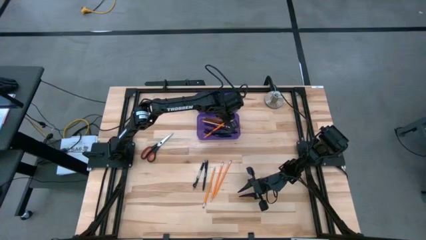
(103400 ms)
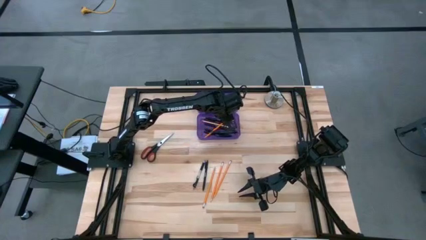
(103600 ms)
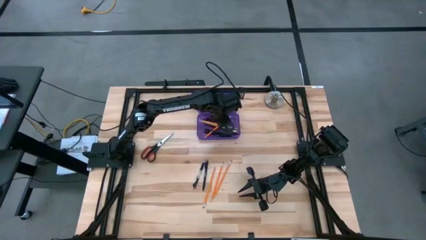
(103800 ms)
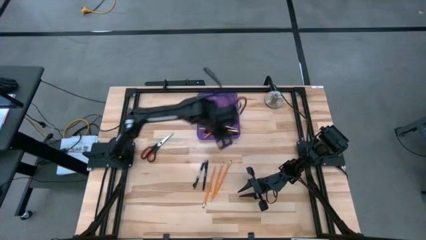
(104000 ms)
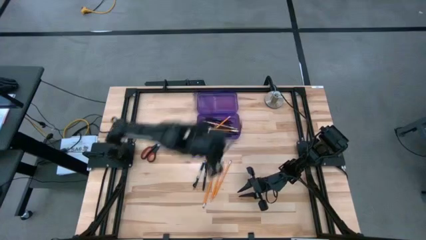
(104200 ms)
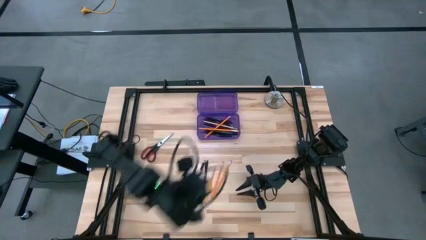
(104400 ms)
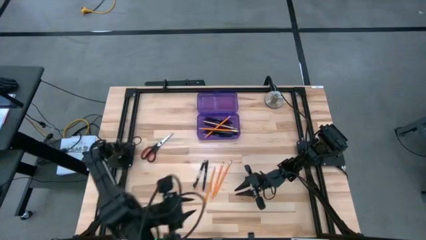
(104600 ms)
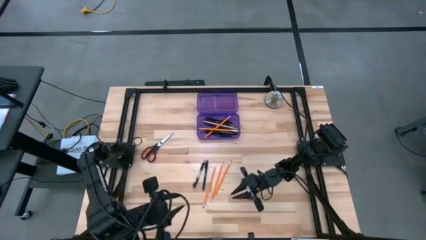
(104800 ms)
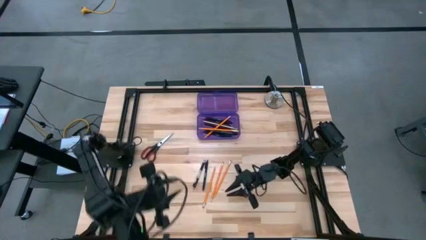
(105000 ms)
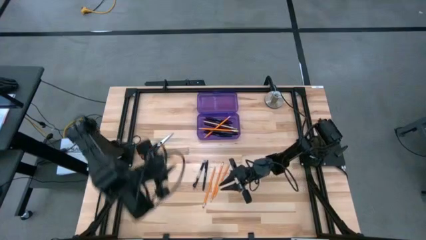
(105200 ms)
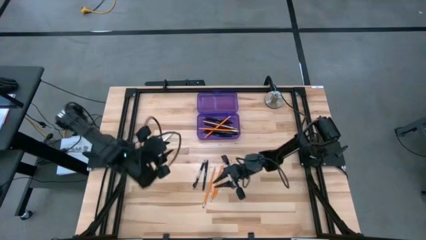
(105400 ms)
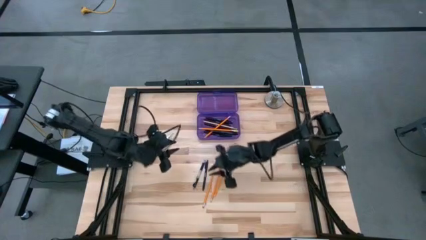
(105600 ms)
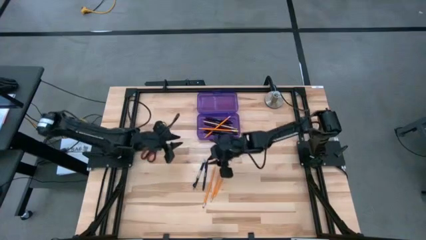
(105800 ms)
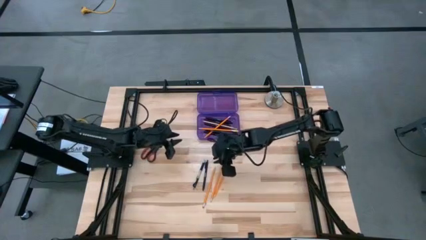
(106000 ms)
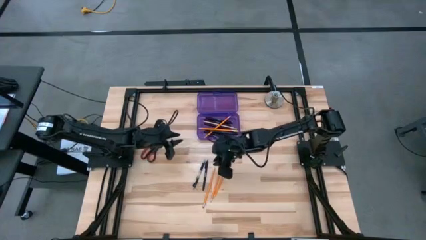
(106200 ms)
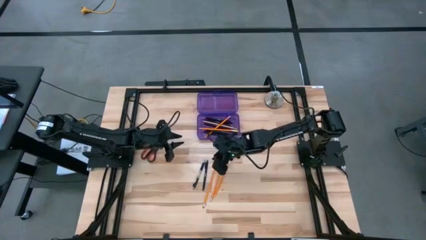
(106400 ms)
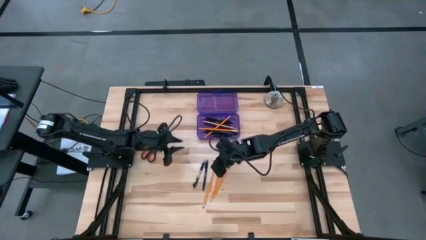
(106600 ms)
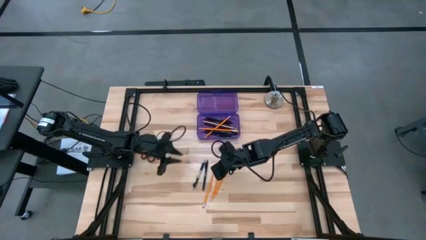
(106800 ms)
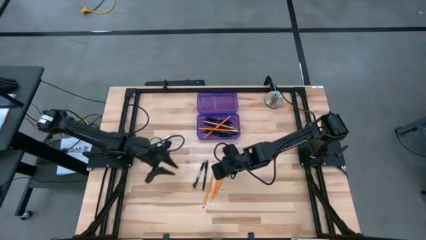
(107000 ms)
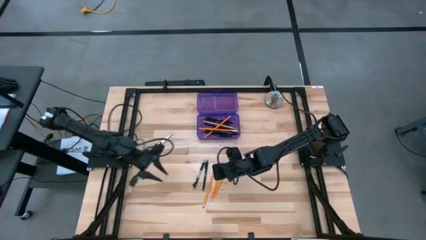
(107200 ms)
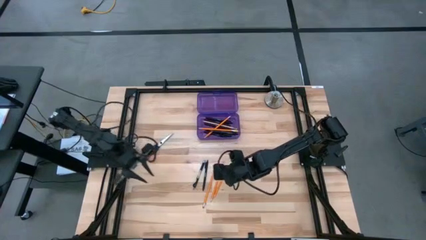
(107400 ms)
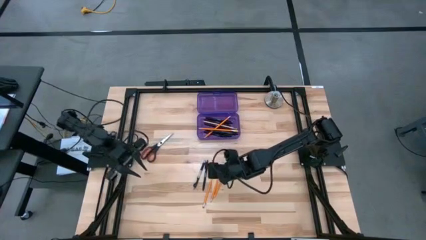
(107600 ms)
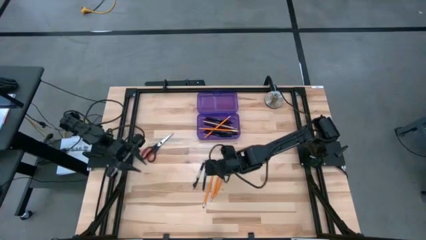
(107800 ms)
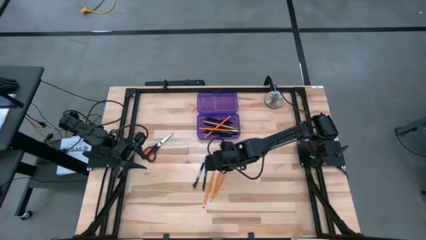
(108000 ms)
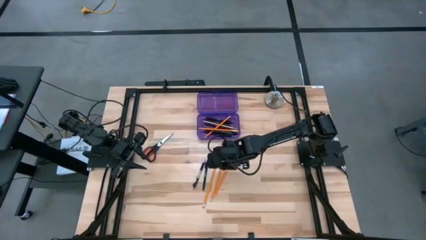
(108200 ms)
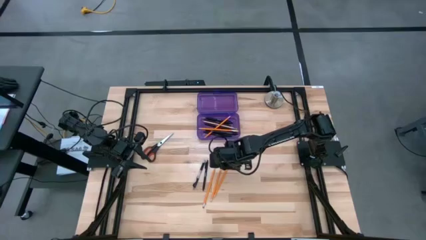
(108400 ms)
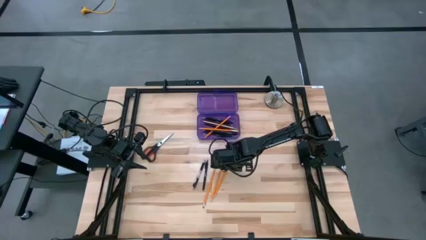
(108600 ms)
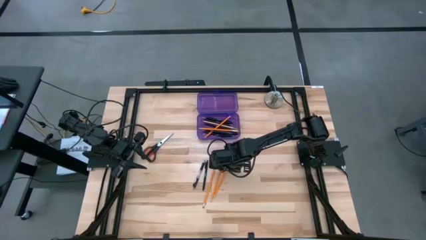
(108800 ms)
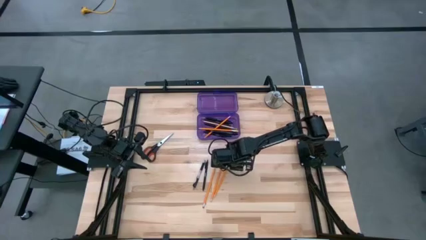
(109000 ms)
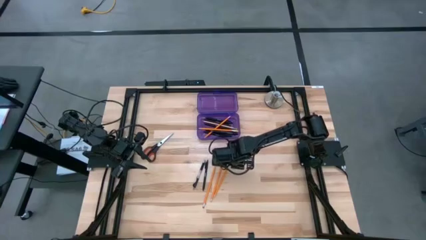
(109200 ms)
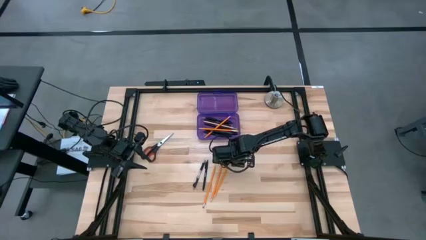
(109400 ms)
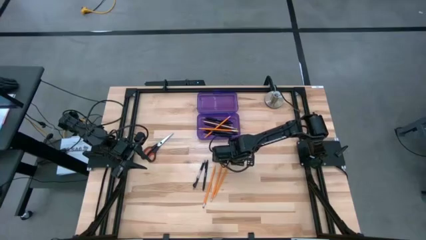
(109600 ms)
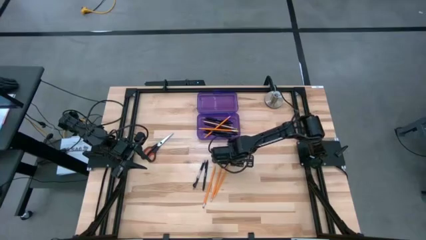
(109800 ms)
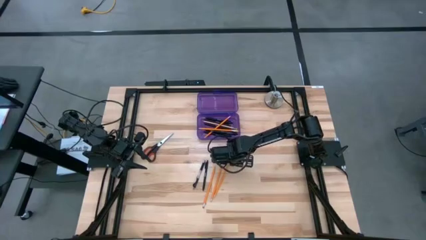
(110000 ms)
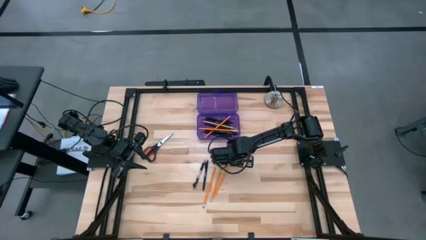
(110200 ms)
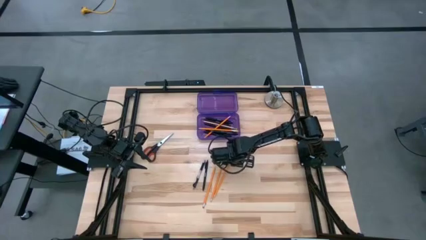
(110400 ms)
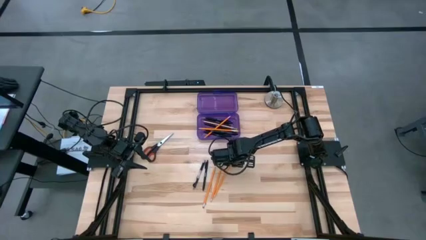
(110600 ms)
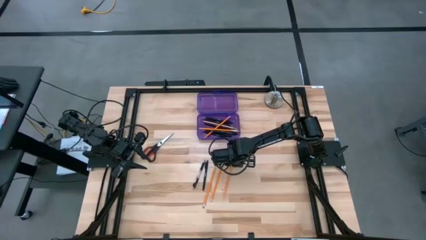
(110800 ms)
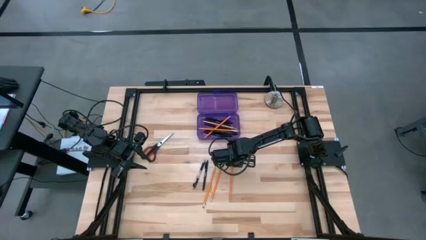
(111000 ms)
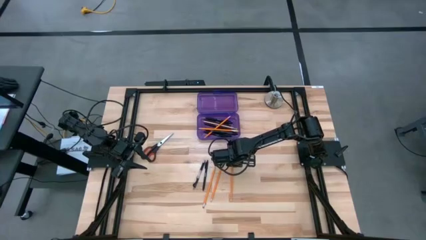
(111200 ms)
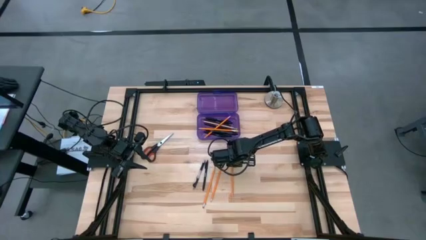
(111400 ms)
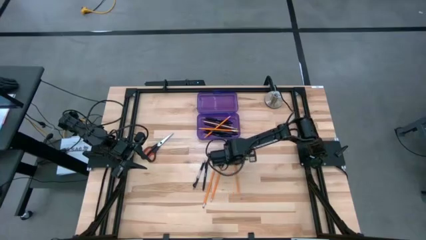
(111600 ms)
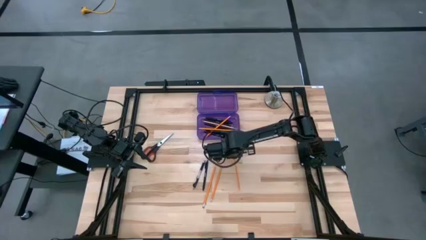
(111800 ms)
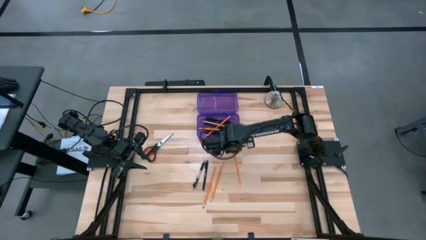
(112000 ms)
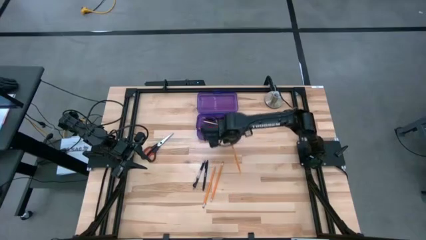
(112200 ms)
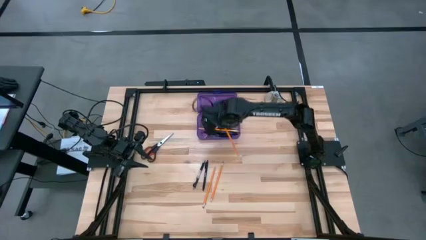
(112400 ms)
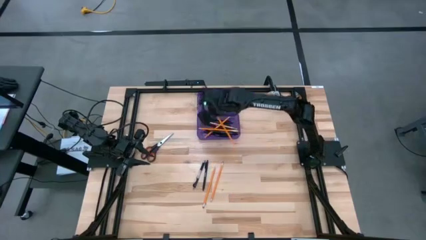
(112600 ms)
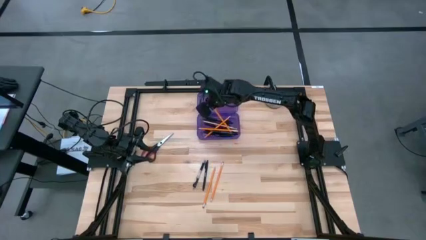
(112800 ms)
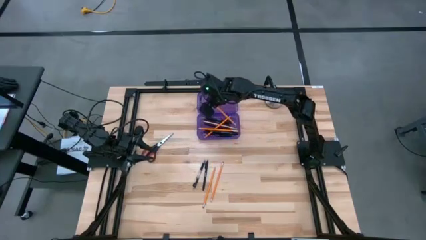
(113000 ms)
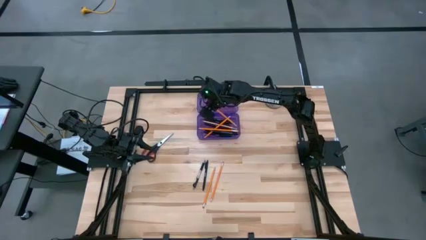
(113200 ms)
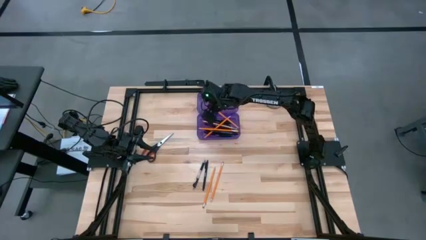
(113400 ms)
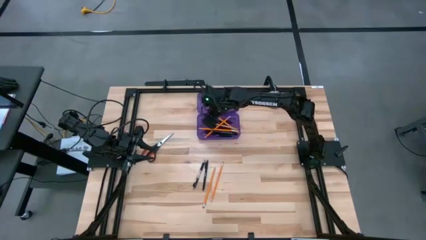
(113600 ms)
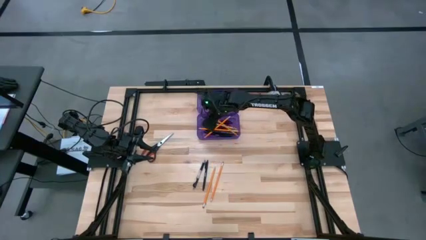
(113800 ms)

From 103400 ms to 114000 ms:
Task: Pick & place school supplies into a supply box
Put the orange pencil into the purple supply box

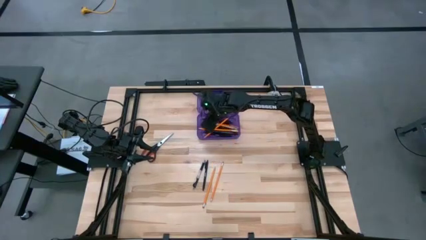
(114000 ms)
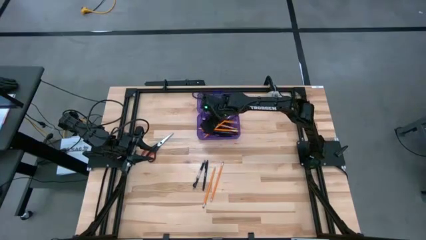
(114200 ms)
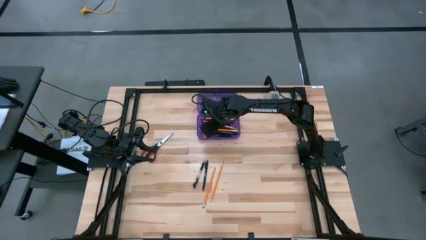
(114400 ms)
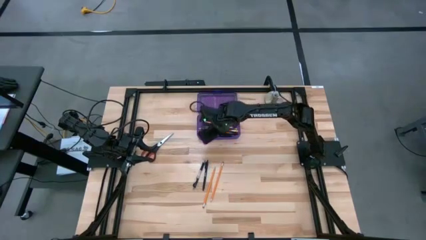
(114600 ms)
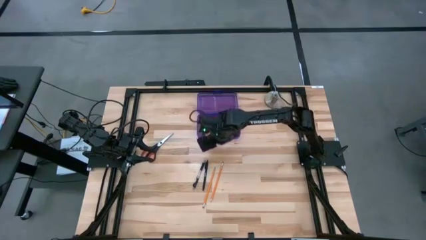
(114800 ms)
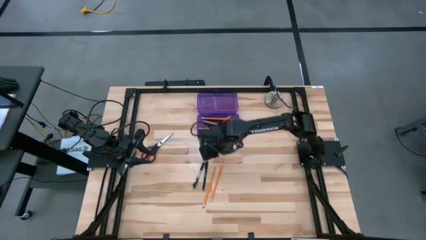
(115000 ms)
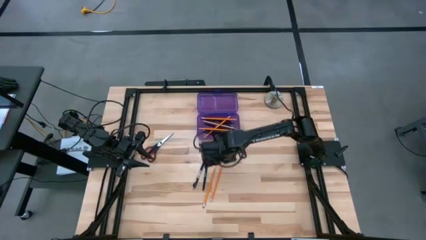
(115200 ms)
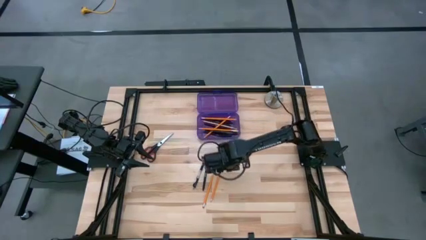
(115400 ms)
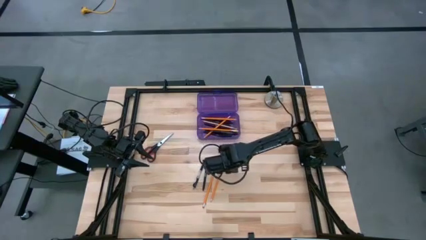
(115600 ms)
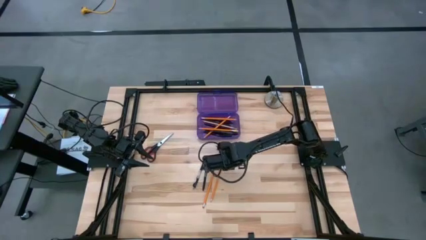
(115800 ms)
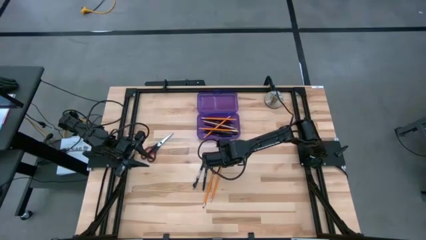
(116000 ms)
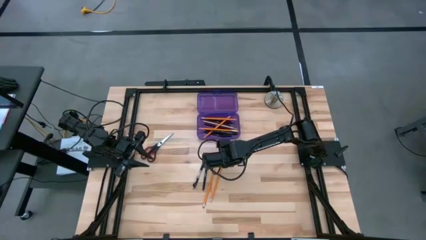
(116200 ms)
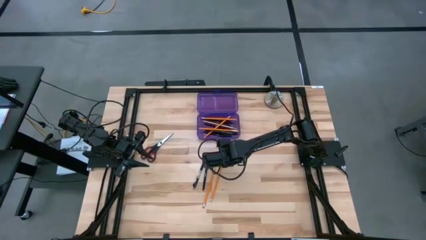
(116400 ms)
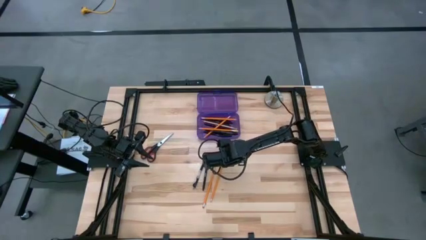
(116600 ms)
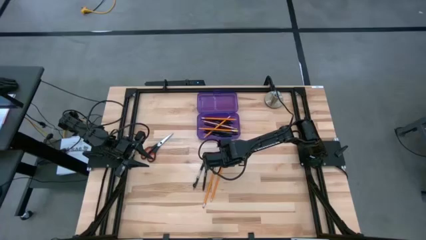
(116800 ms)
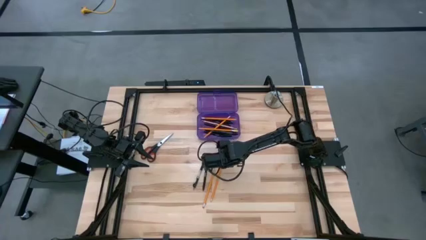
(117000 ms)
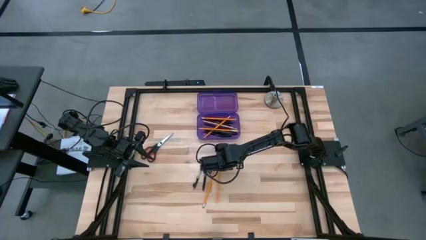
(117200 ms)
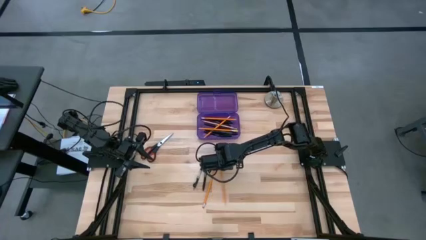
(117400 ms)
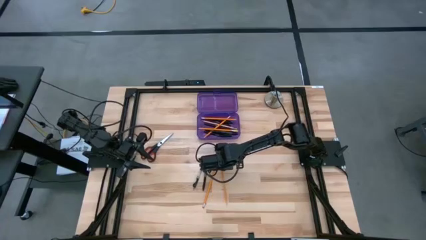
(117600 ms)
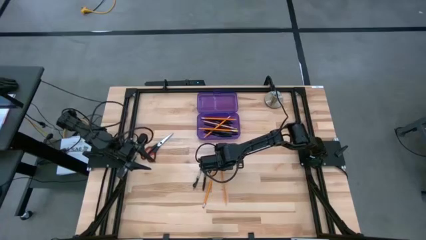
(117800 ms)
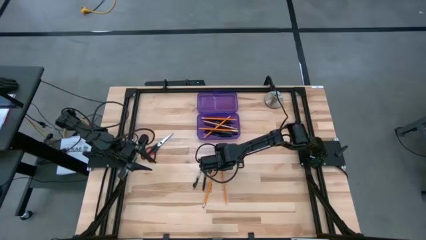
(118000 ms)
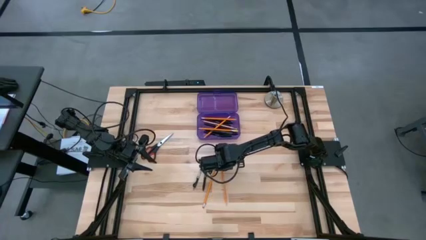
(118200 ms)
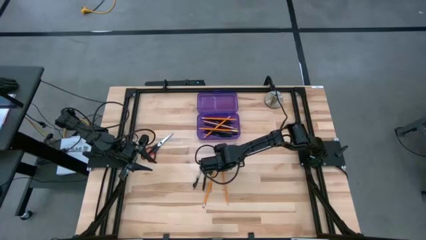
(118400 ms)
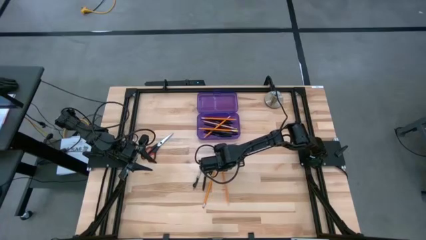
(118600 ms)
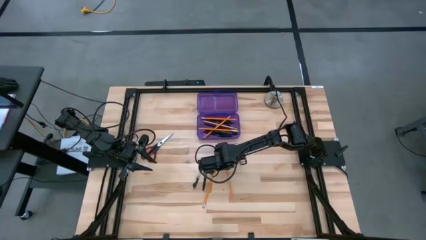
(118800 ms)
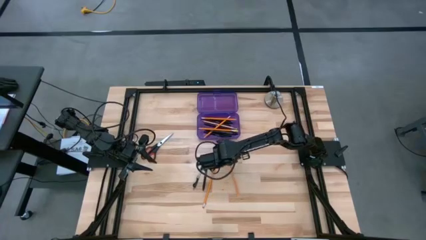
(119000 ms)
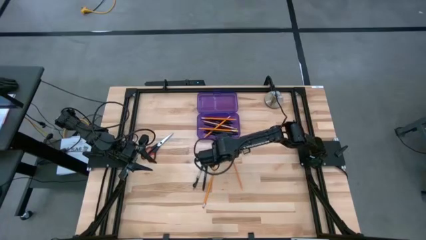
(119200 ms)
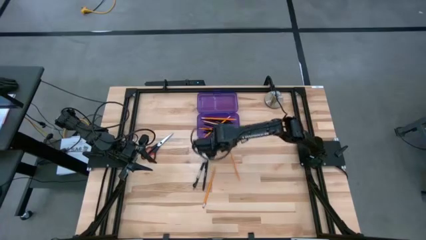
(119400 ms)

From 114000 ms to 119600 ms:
Put the orange pencil into the purple supply box
